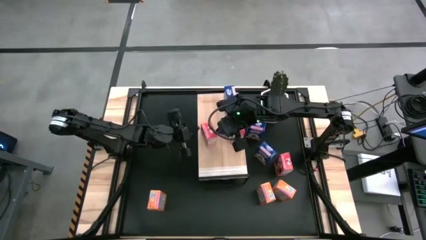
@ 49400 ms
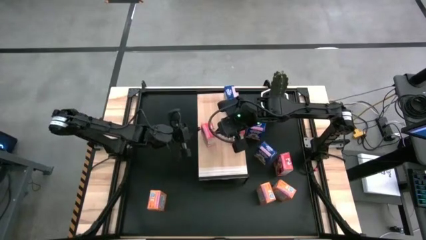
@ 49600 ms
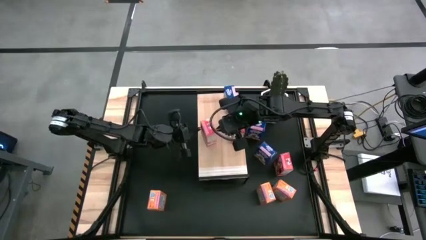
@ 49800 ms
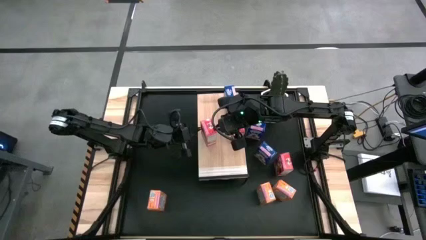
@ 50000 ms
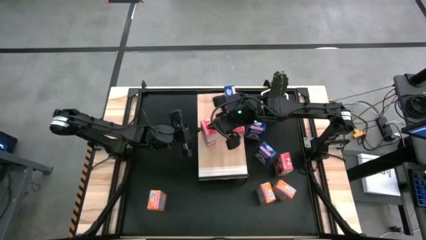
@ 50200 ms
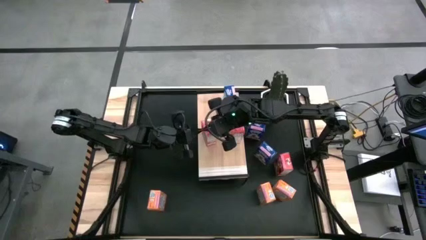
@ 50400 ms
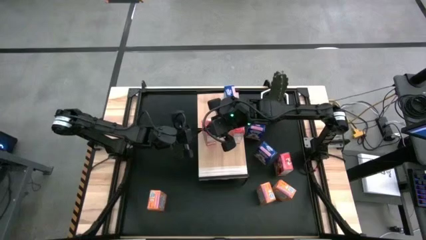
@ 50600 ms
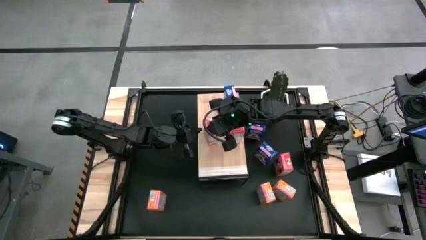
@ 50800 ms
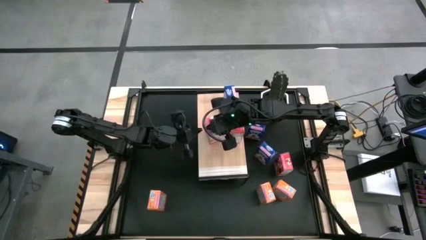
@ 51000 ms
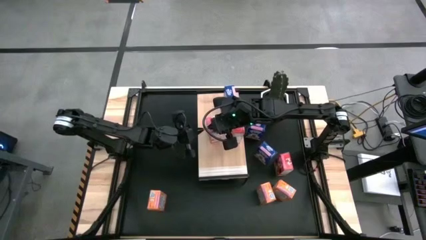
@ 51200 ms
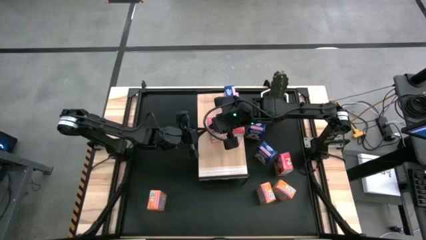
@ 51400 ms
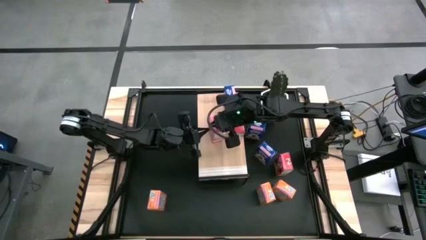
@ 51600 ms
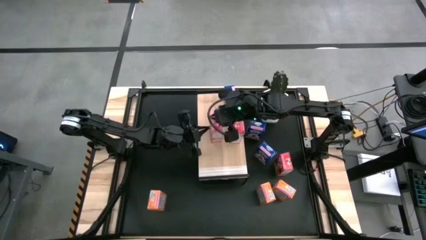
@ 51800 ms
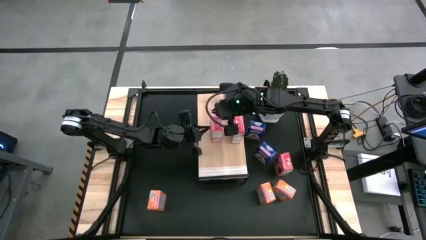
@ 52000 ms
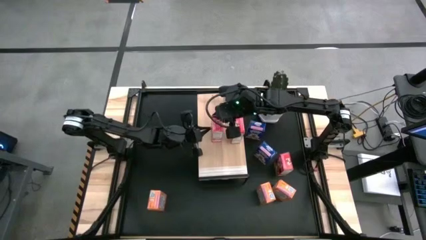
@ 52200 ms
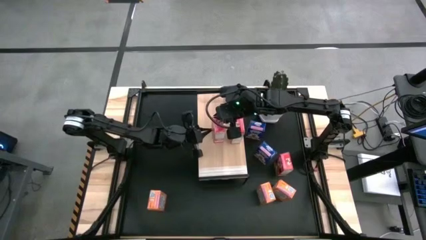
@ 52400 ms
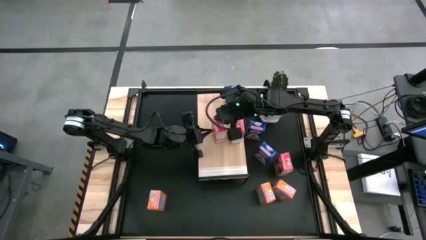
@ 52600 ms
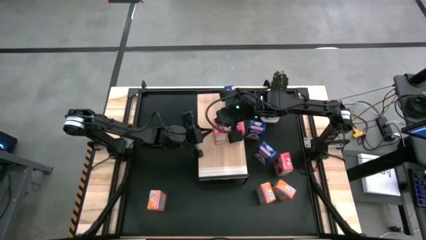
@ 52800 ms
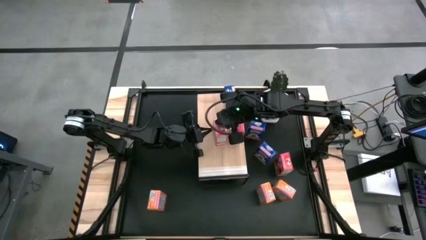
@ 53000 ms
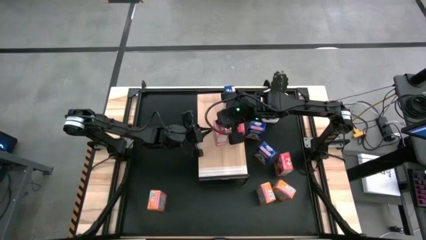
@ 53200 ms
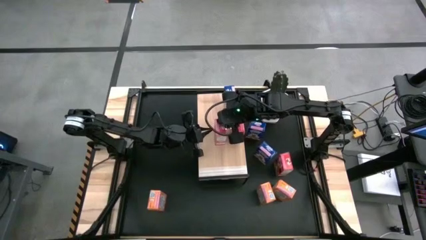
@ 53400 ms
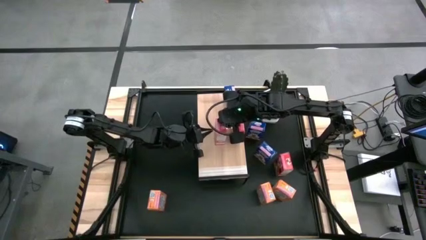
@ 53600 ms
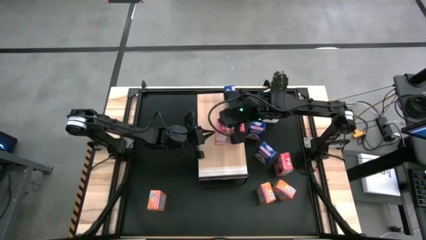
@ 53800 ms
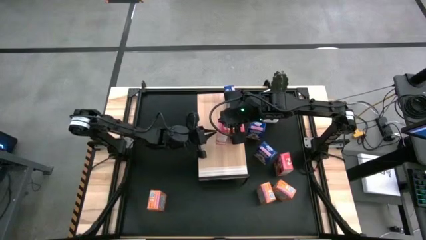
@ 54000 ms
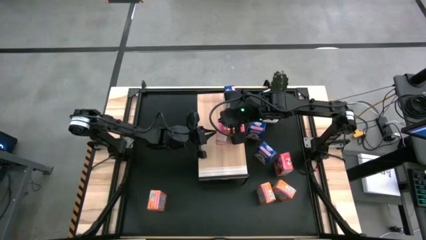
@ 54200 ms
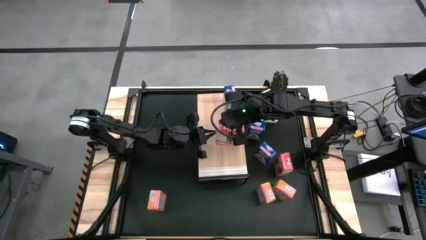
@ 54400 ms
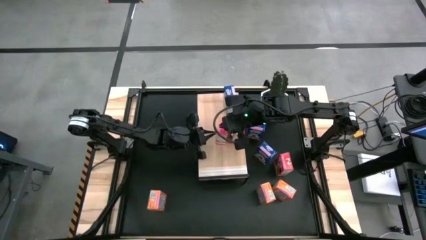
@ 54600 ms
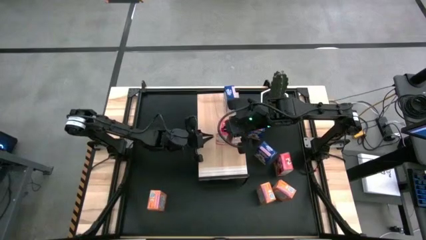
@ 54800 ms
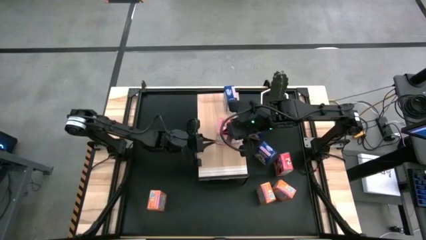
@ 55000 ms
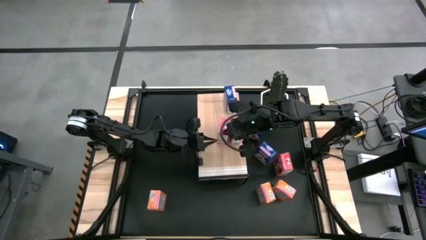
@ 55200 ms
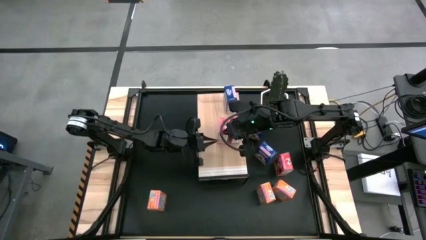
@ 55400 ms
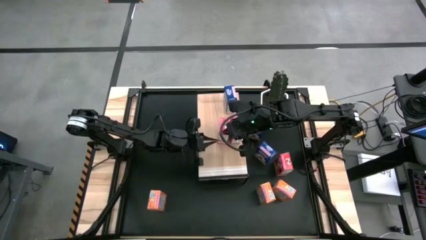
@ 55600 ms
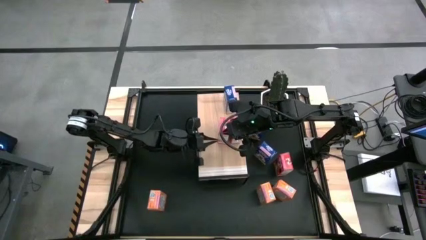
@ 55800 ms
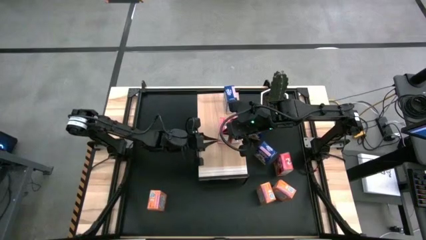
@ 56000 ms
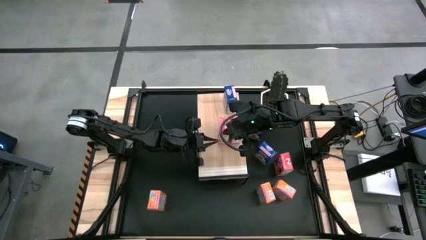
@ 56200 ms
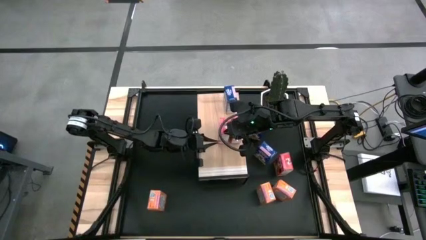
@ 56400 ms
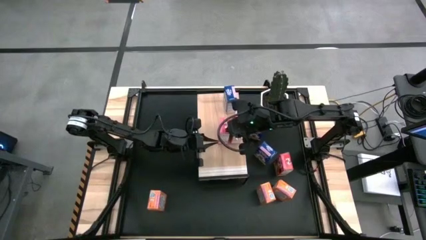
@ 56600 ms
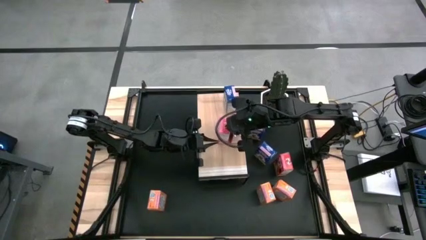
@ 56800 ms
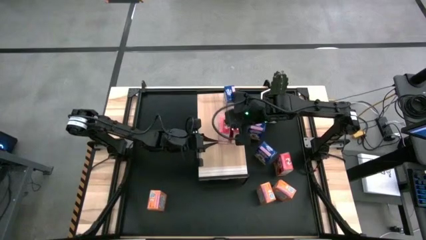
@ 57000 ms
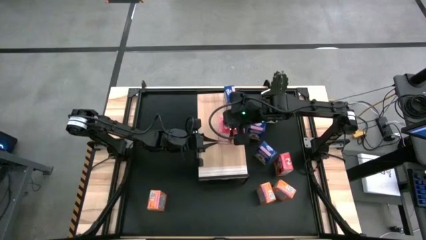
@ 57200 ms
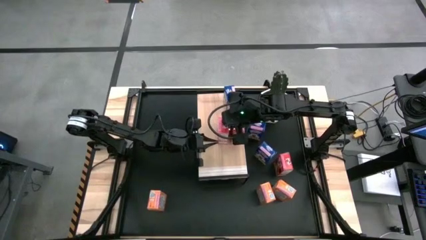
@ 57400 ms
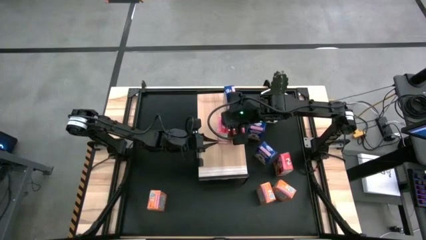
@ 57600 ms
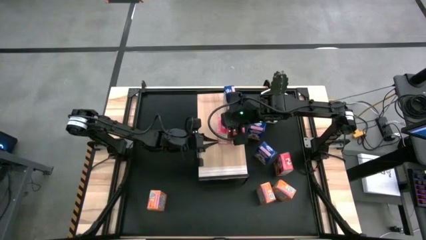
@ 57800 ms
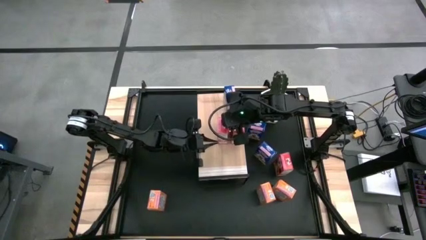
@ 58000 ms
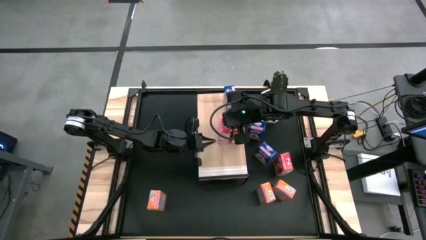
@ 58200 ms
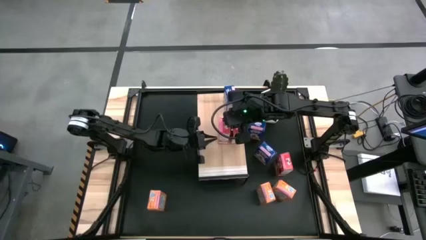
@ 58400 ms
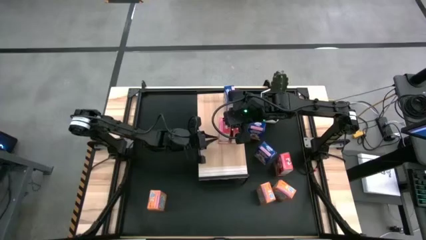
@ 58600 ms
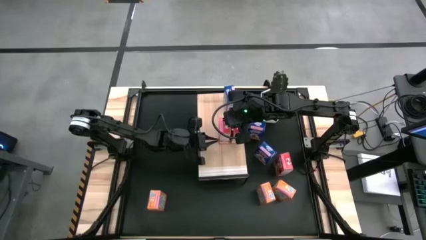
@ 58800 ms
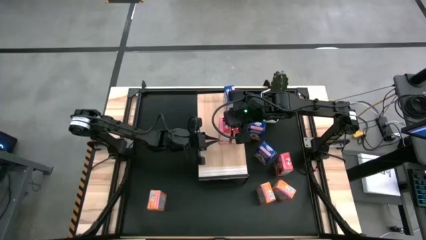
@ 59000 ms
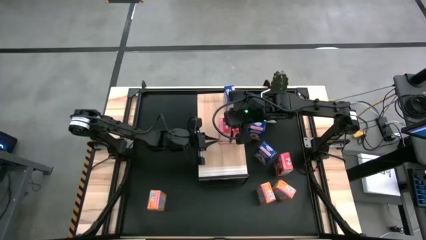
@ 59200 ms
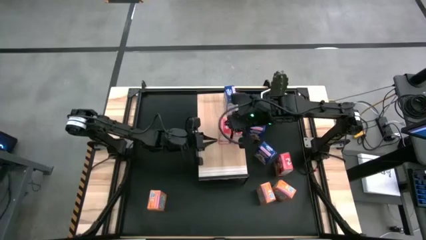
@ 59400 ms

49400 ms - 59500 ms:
Task: Stack cereal on shelf
Put the left red cereal box aligned with the other red cereal box on the shelf

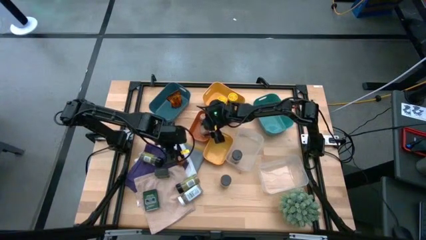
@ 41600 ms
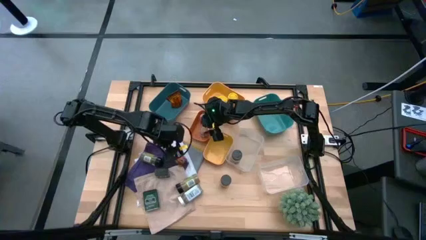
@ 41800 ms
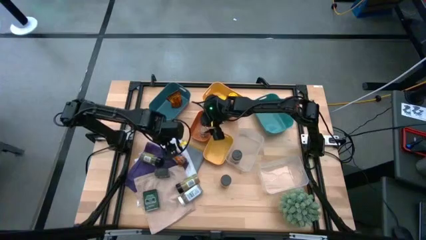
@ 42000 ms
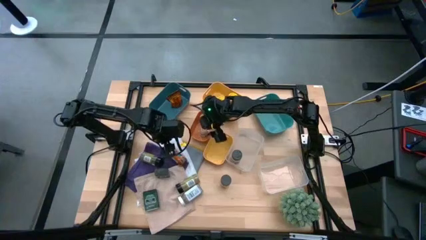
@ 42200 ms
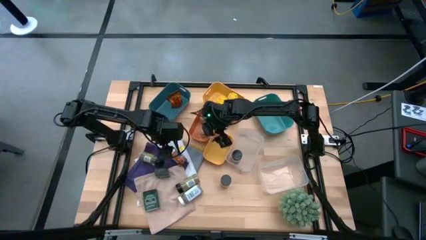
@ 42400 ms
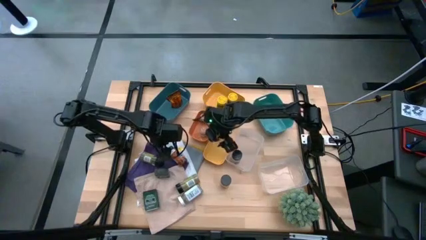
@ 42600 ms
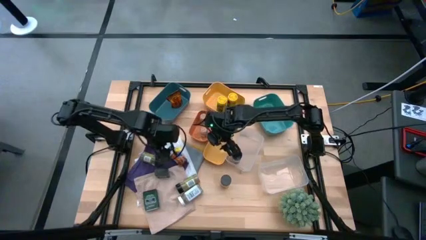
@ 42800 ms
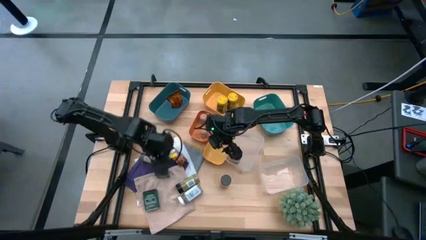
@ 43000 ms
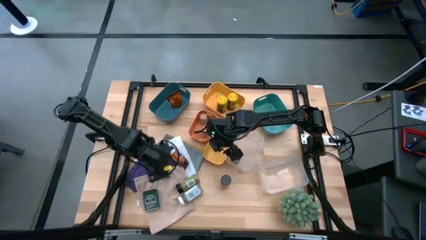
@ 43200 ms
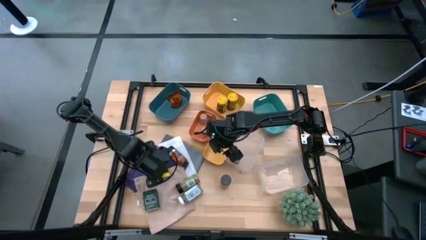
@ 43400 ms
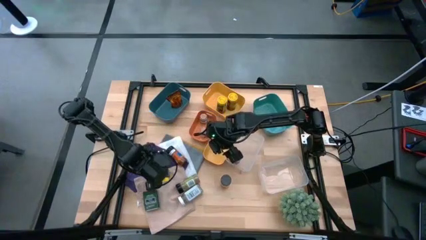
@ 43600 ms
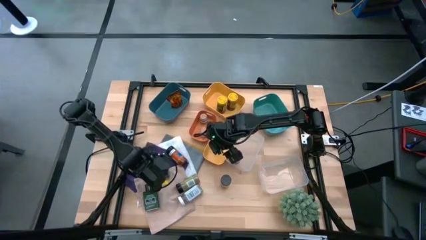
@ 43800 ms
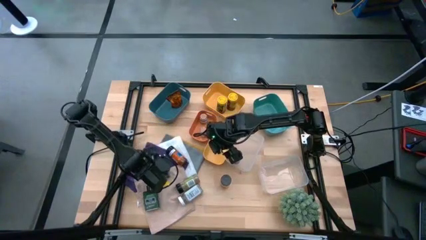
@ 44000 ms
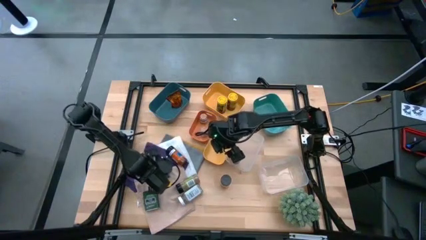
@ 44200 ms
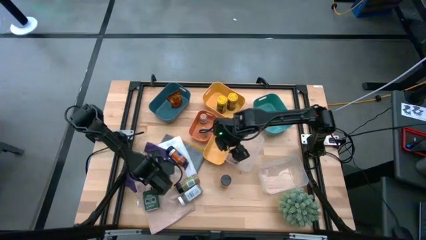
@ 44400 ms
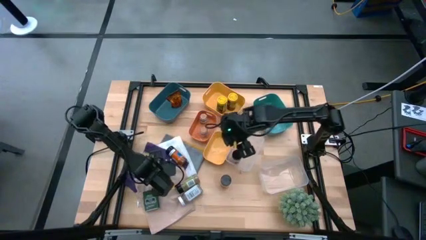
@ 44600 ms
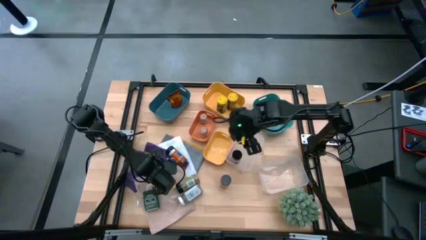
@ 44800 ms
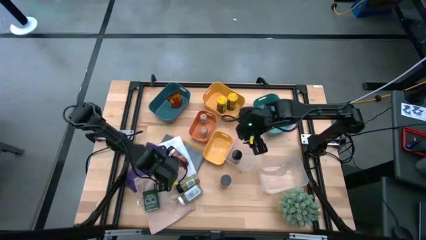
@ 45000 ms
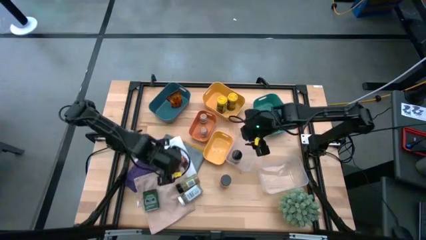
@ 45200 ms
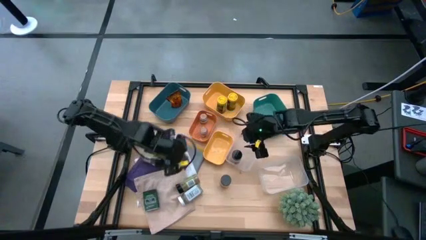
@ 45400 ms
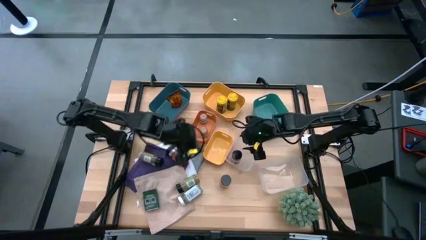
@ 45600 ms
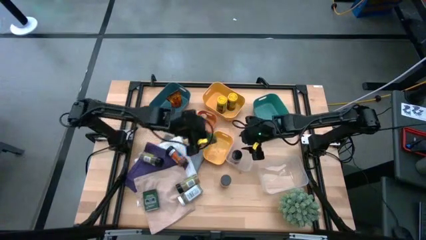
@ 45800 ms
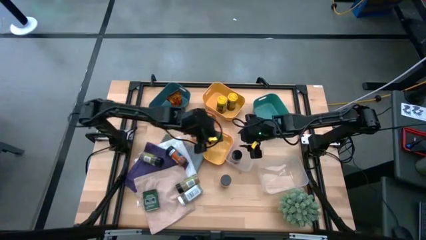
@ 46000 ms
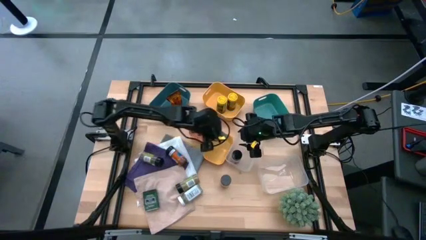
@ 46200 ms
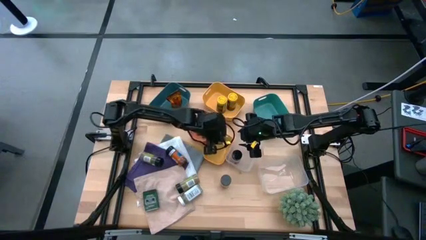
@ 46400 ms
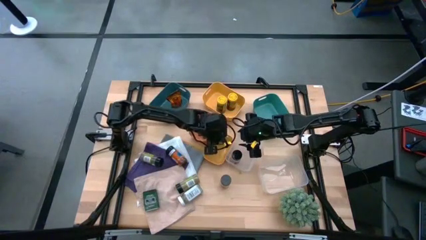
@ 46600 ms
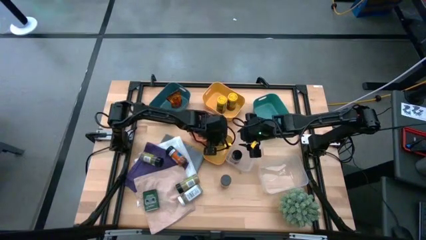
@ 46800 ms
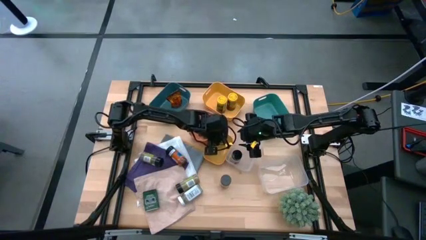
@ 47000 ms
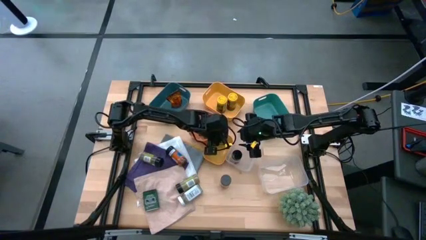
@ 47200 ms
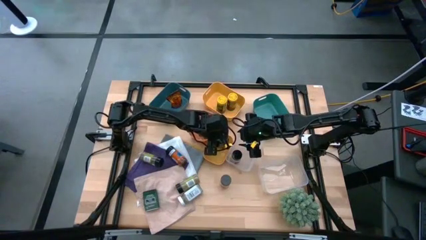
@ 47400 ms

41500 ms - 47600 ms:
Task: Sort spices by type
Put the black seasoning can into the small yellow bin
